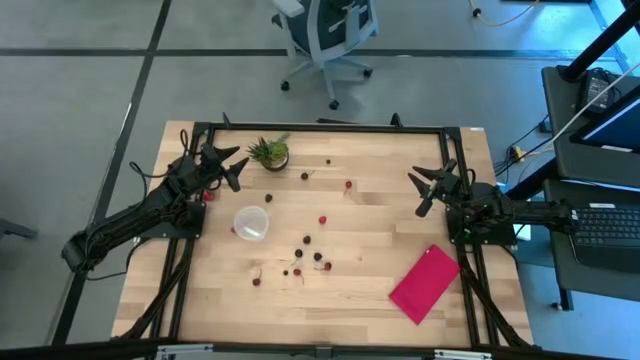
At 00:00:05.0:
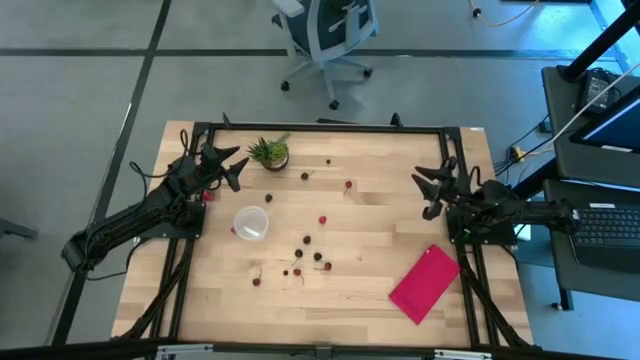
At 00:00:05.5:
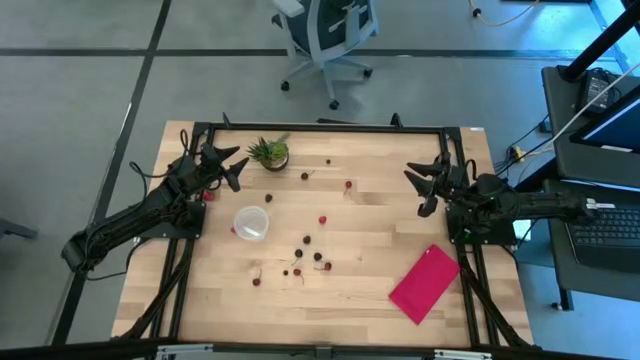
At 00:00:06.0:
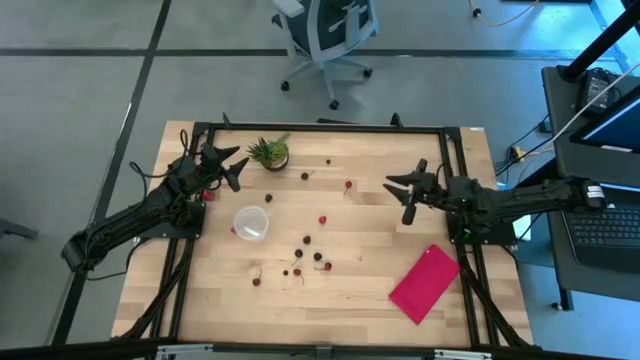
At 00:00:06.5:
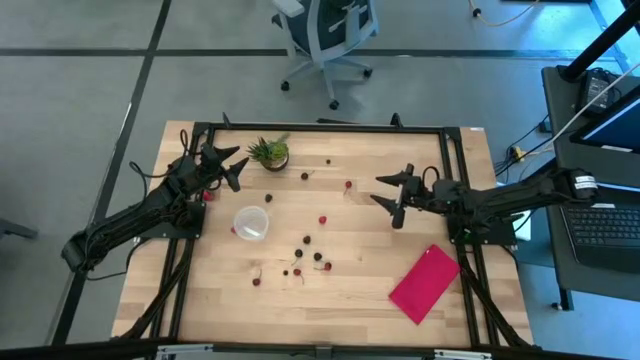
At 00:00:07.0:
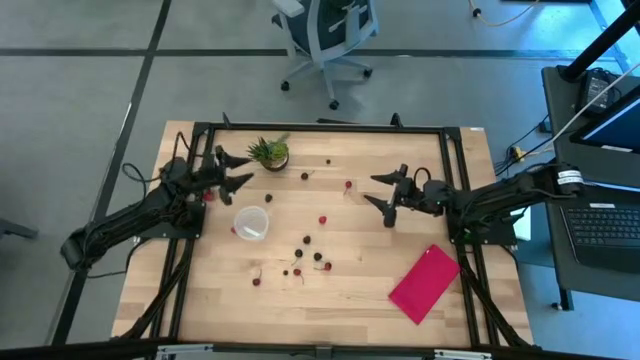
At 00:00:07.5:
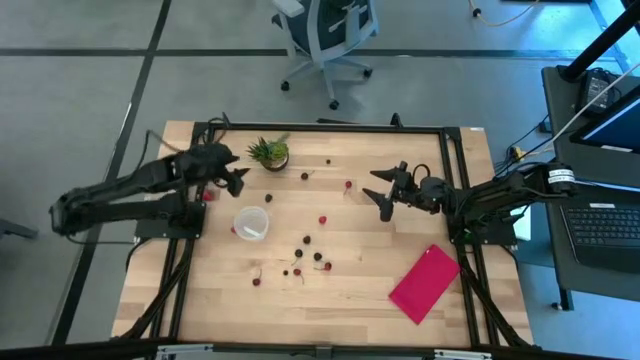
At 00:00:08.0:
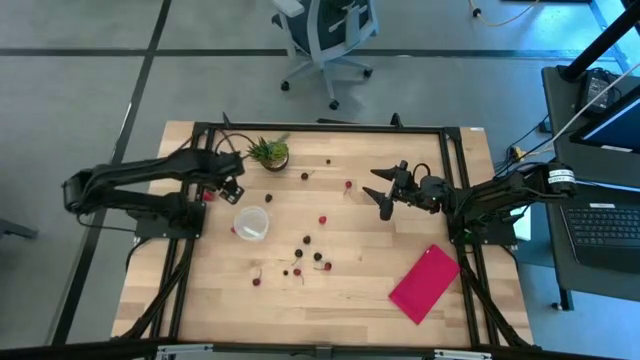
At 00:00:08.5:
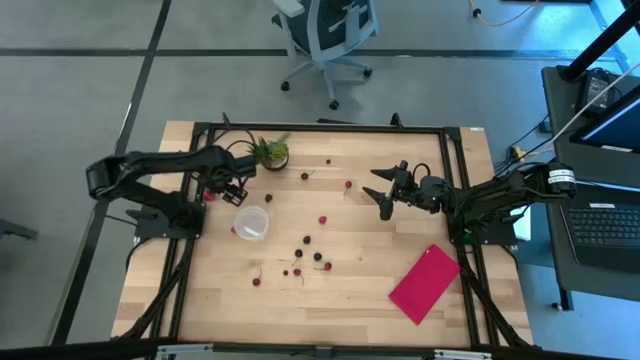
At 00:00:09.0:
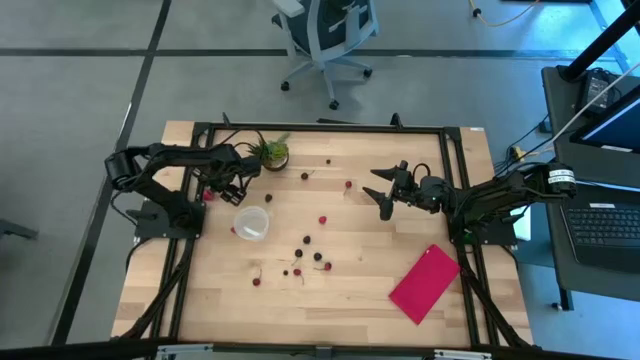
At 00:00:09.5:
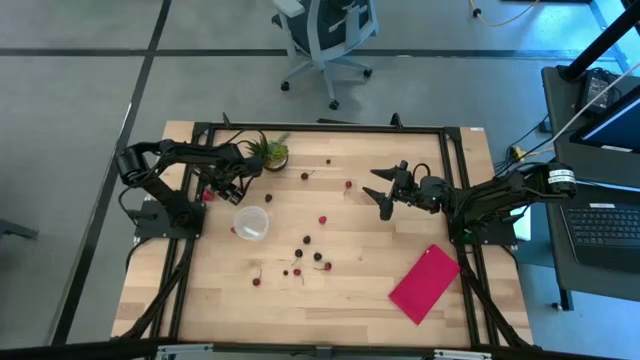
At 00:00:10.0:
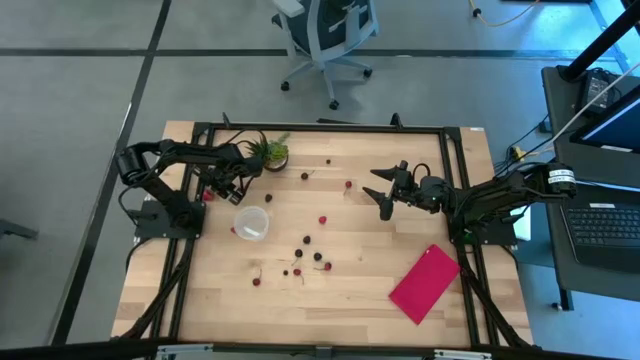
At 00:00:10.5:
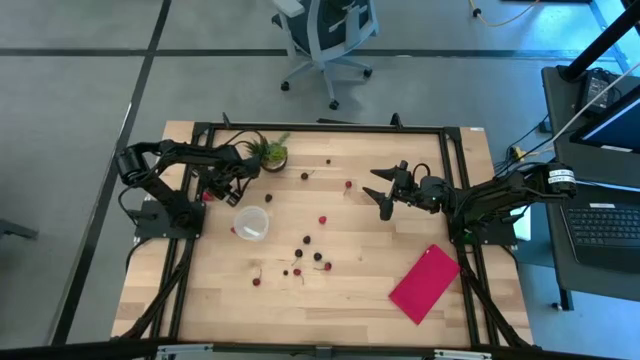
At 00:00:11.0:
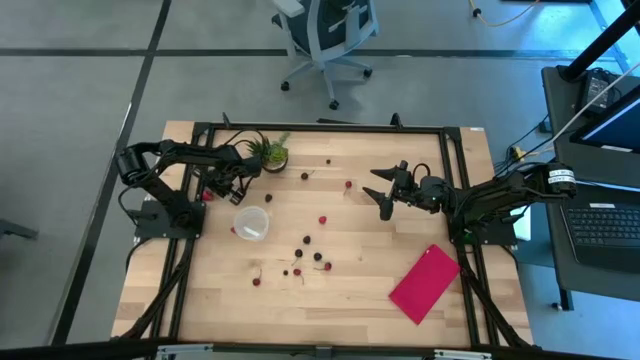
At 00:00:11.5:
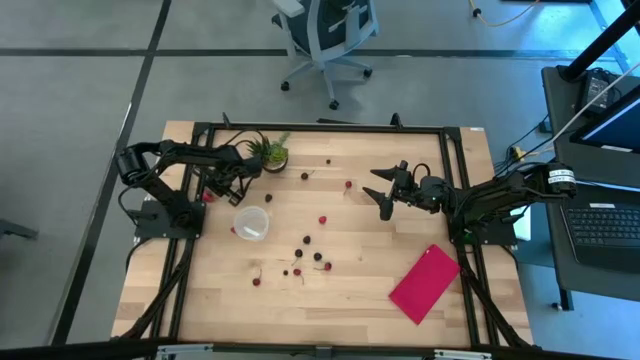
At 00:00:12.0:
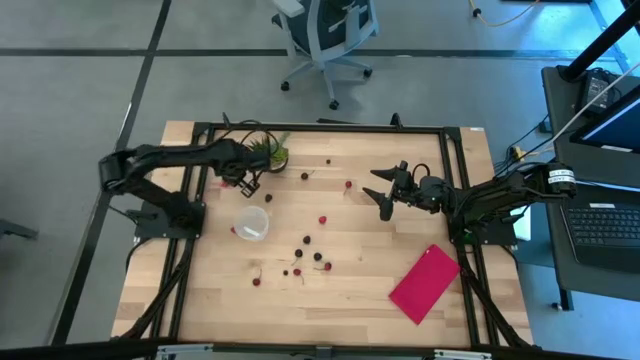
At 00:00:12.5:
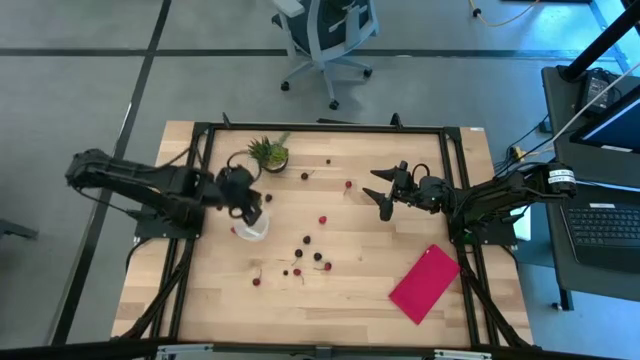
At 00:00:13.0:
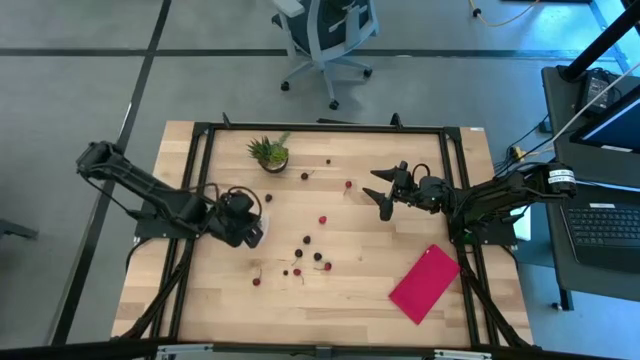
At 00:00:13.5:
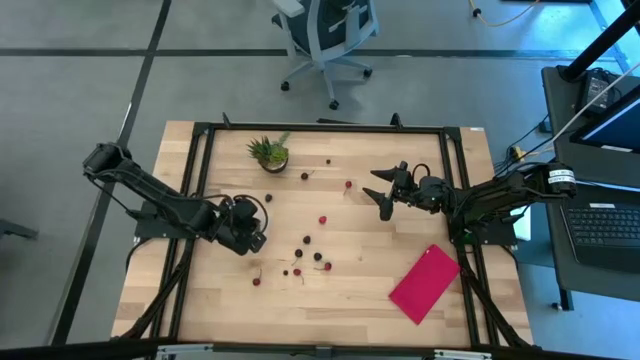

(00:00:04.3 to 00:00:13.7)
Task: Pick and placing Produce into tupperware
Put the red strawberry into the transparent container

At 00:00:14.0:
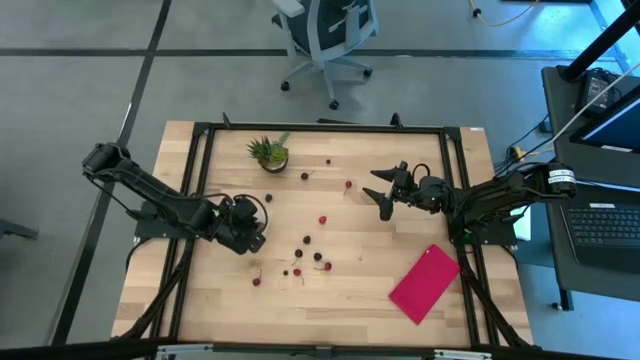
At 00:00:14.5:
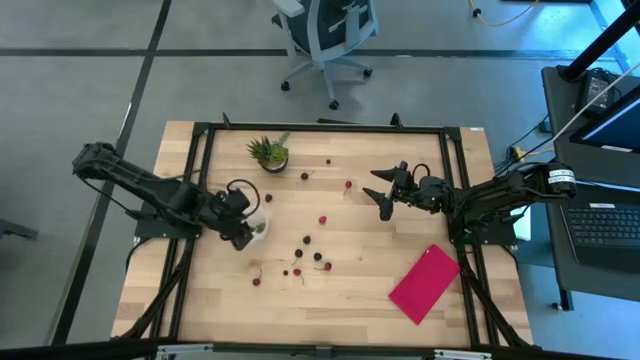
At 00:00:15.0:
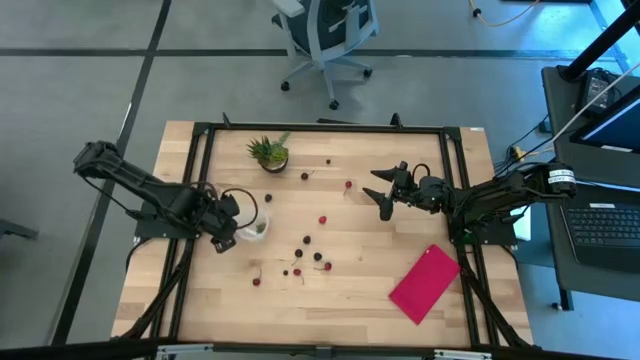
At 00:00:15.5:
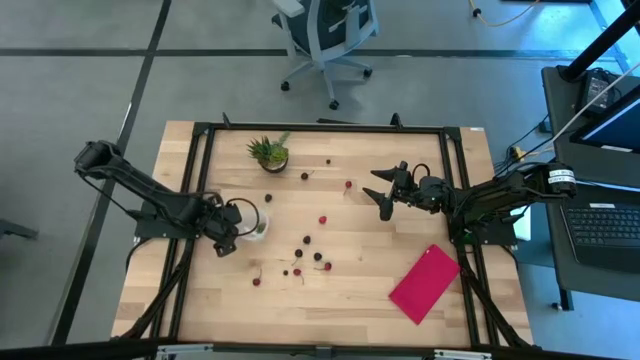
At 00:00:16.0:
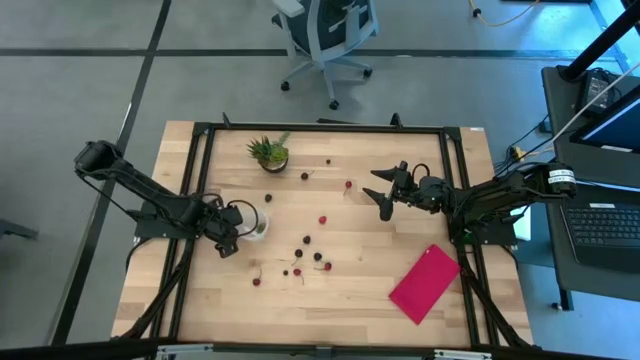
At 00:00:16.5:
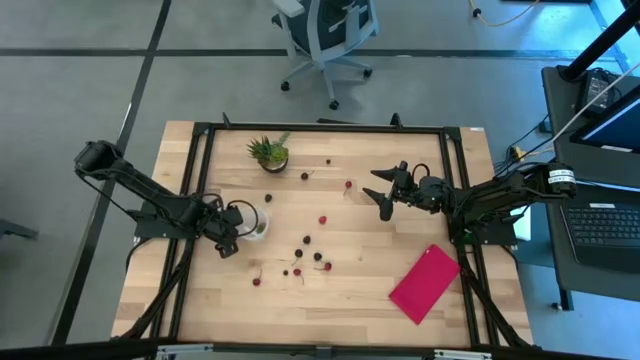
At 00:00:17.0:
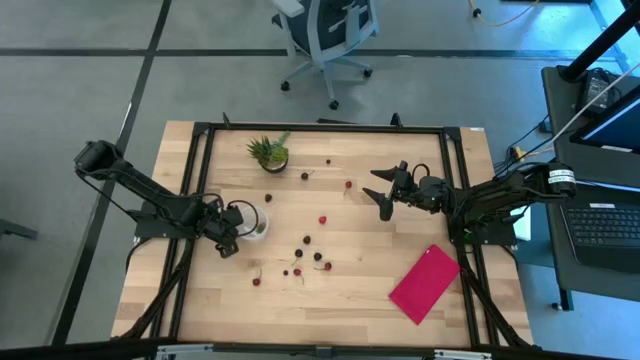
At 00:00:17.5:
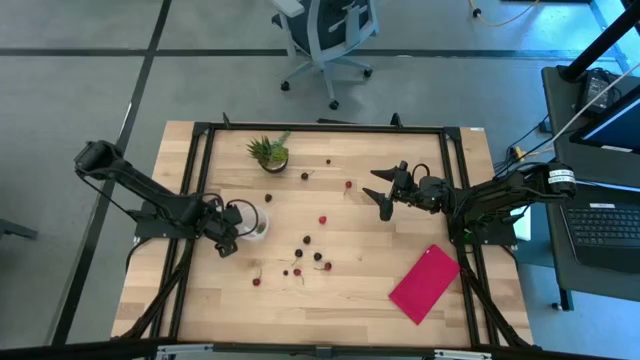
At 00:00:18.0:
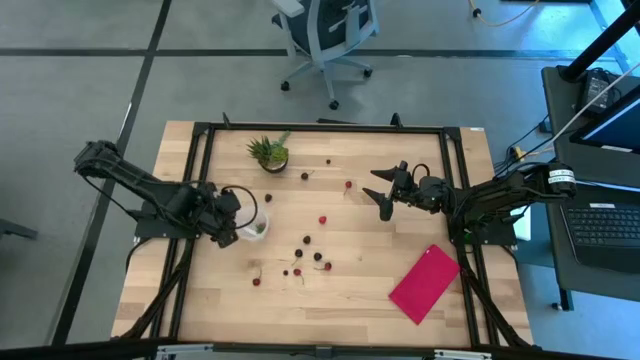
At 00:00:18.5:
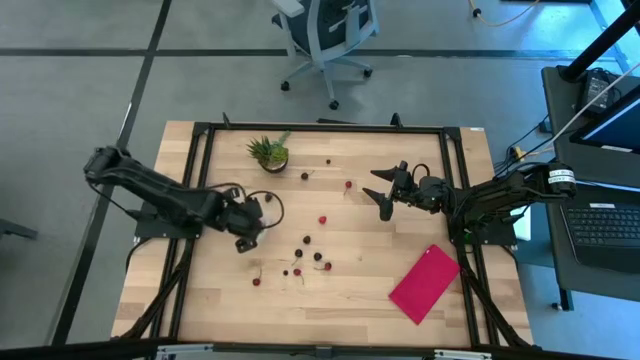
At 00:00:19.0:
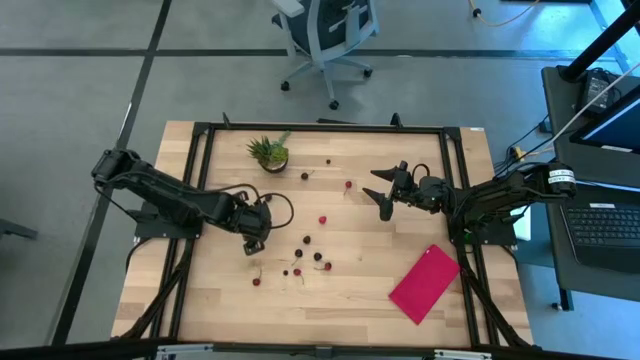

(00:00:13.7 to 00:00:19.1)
Put the red raspberry into the transparent container

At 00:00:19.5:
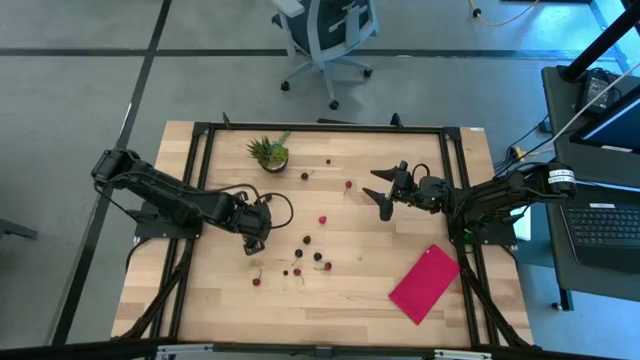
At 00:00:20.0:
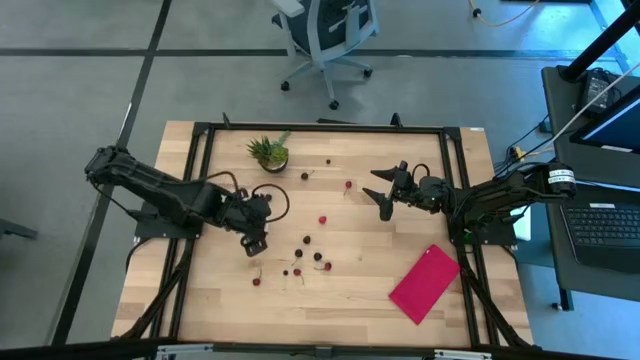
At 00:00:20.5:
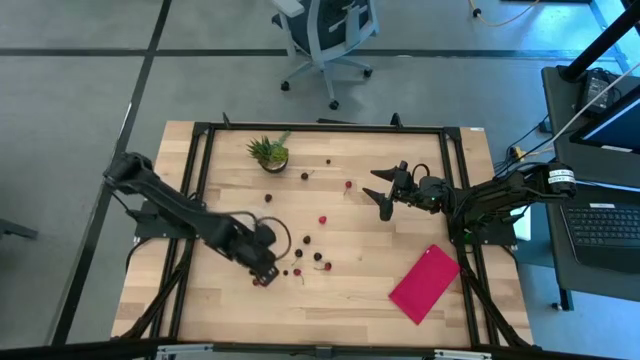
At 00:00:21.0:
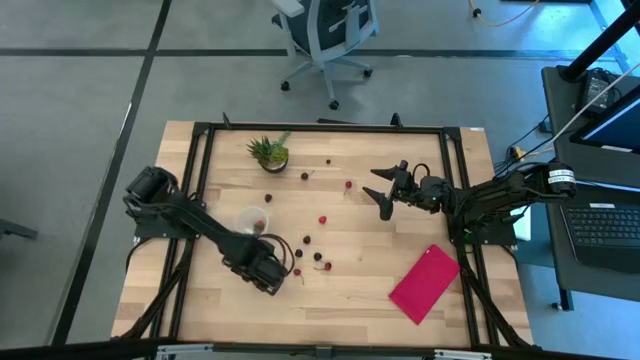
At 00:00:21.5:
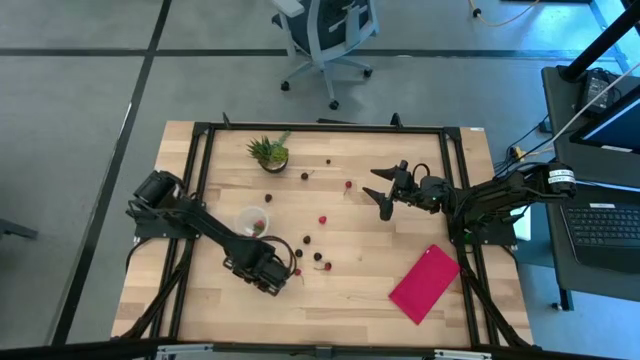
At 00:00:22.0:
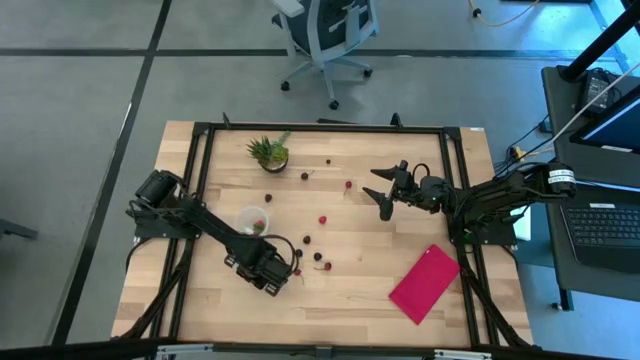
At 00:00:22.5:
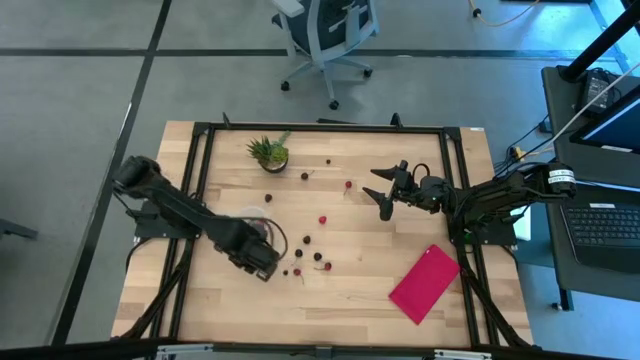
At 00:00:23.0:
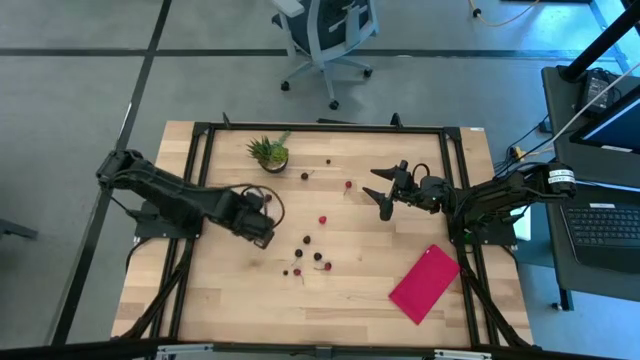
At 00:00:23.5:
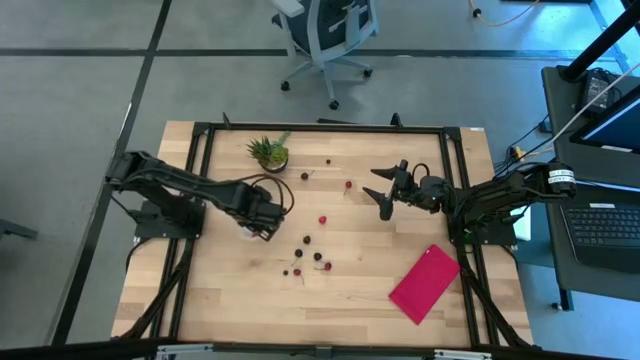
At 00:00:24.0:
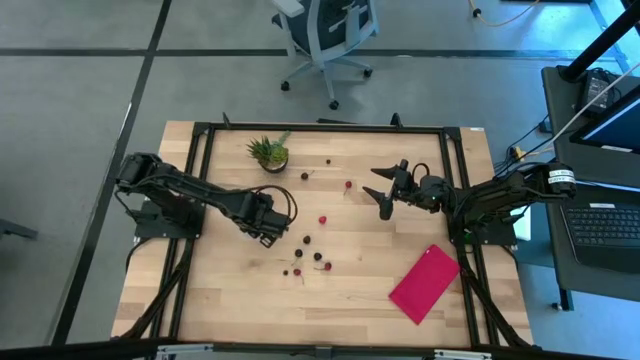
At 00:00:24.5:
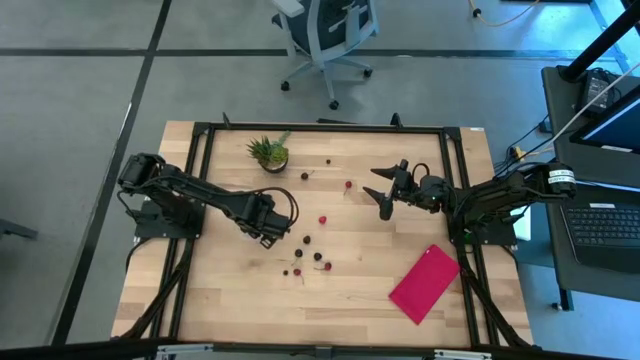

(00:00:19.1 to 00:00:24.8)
Put the red cherry into the transparent container
